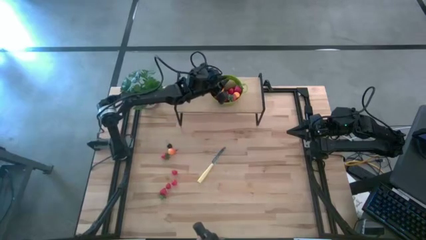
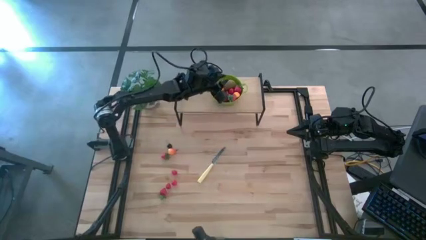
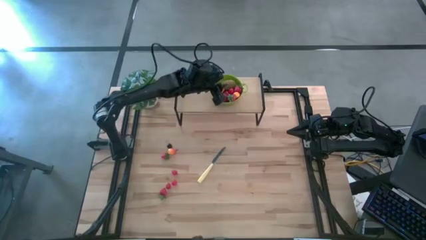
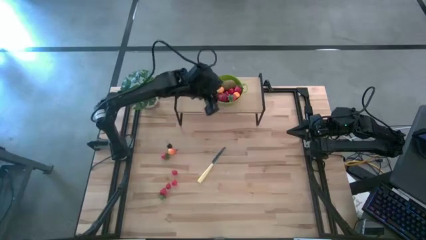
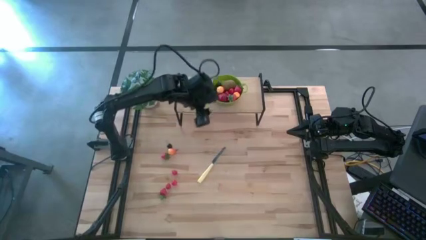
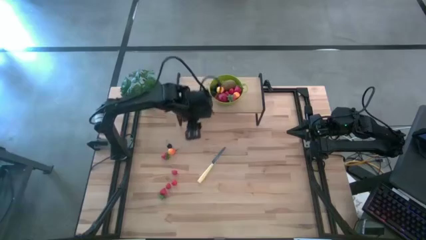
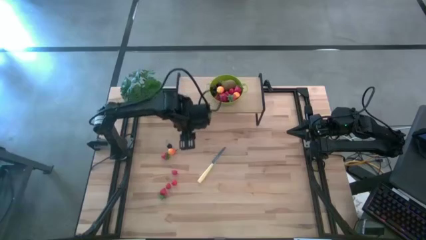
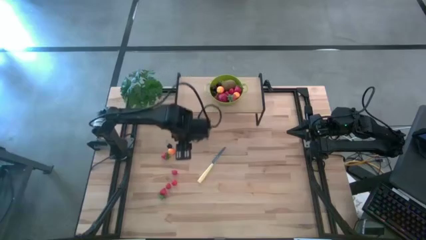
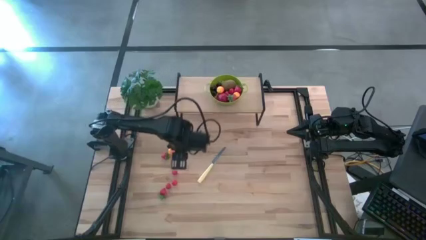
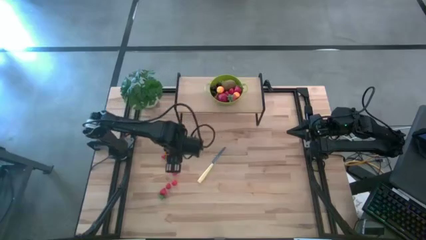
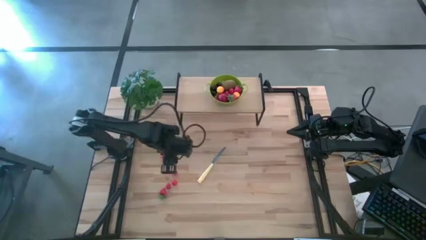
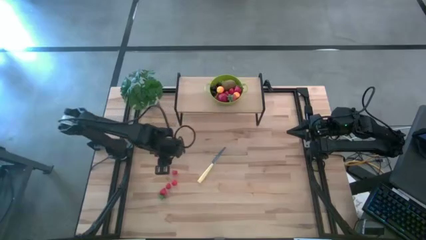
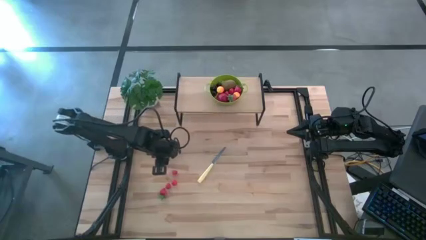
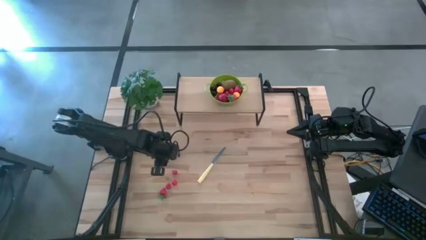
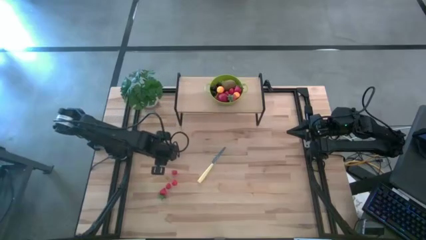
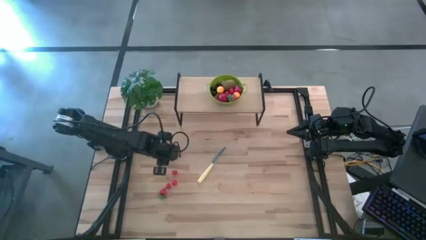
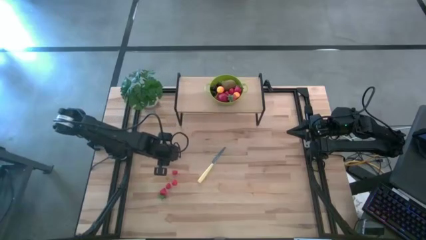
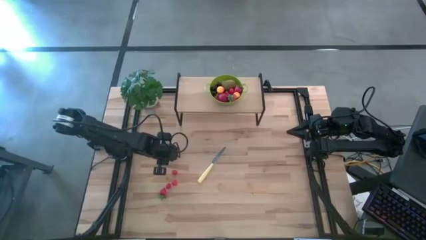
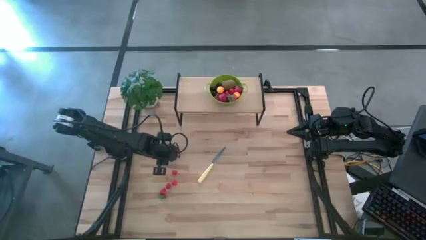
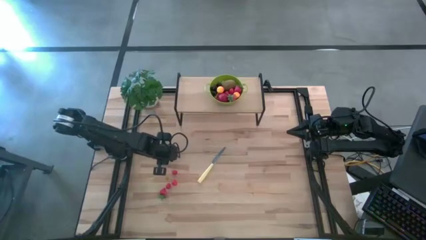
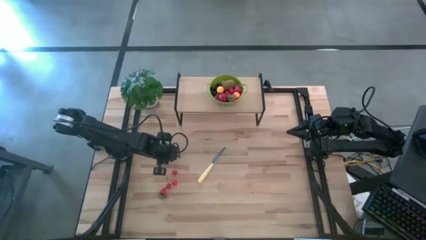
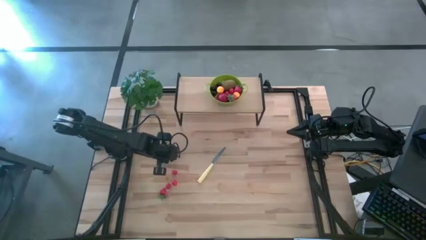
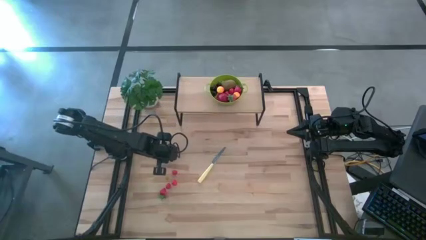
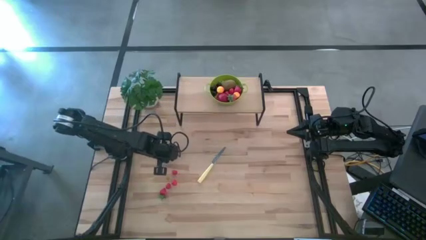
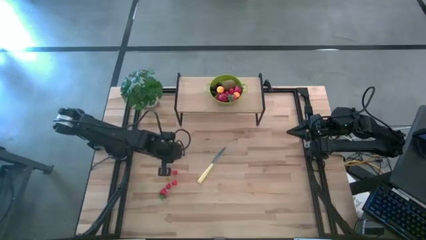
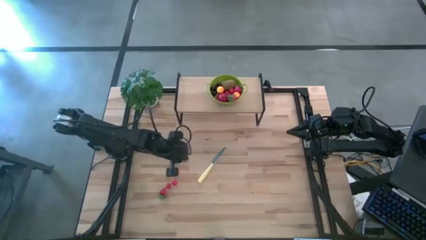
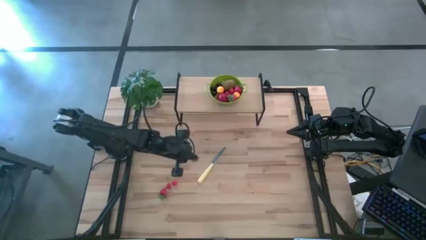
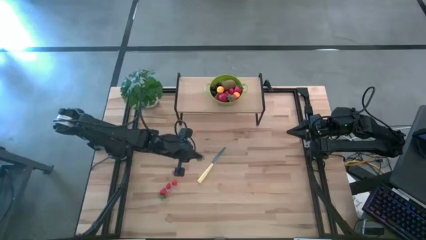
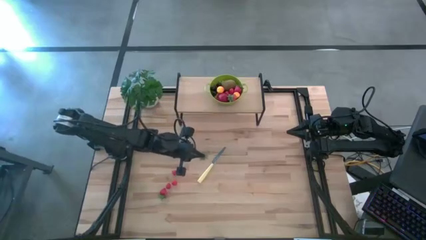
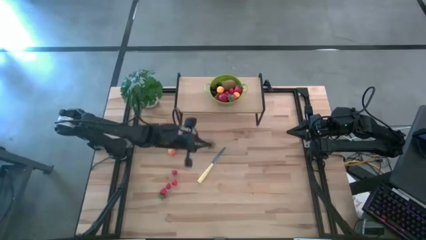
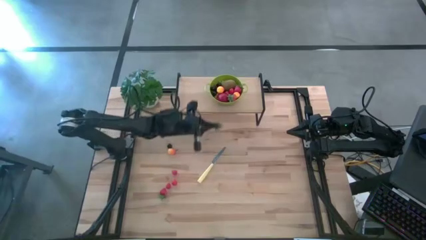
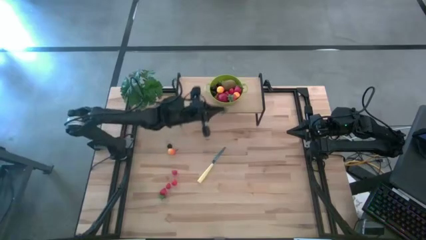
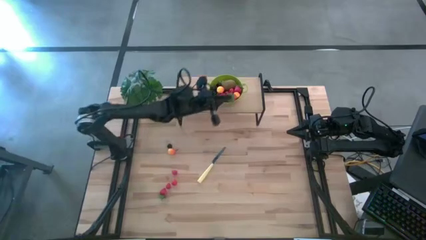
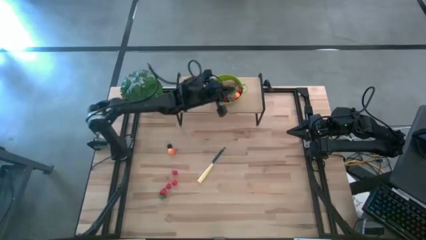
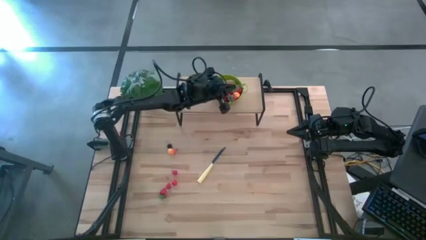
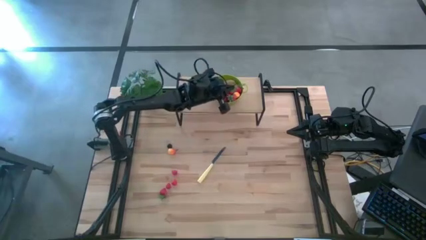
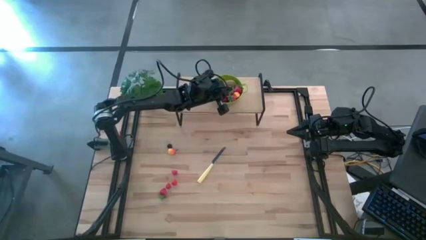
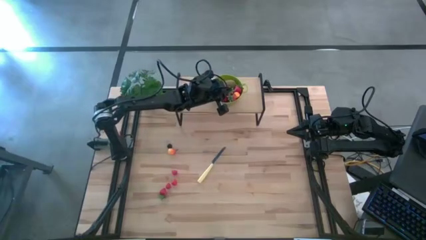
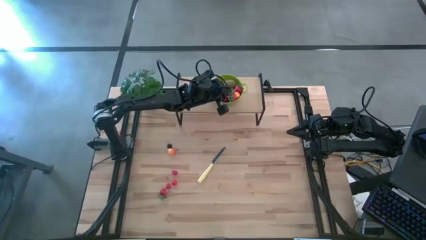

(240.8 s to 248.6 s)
Task: Pick & Place Fruit
Put the strawberry into the strainer bowl

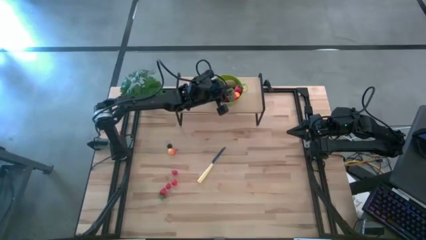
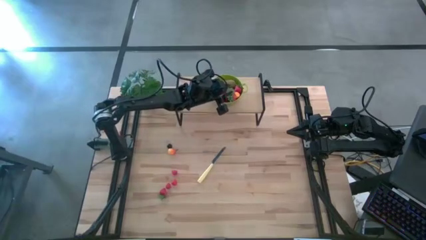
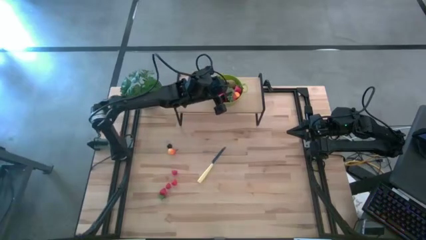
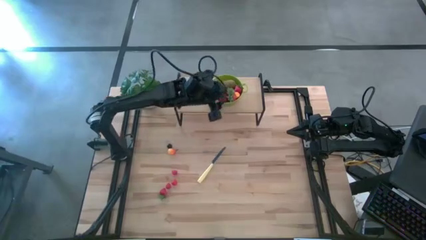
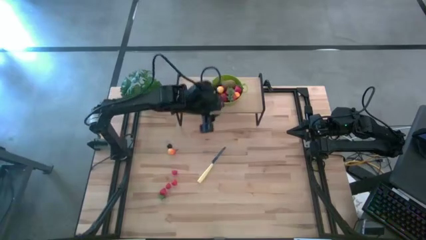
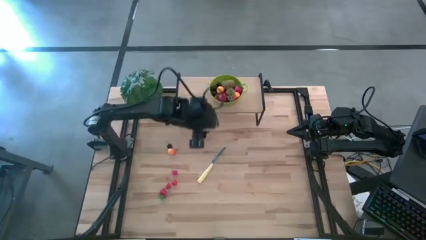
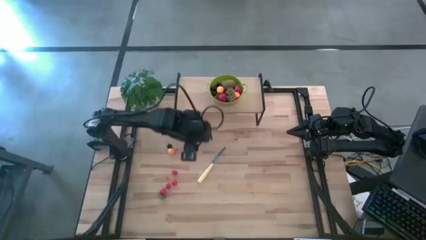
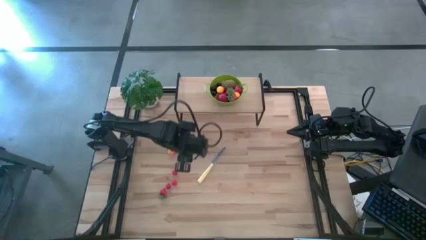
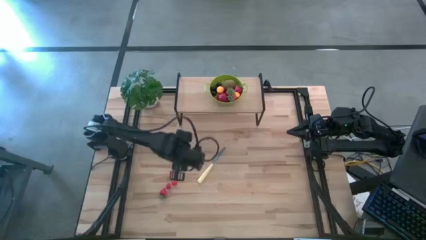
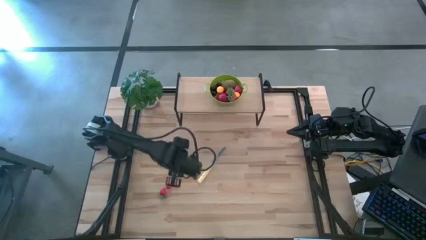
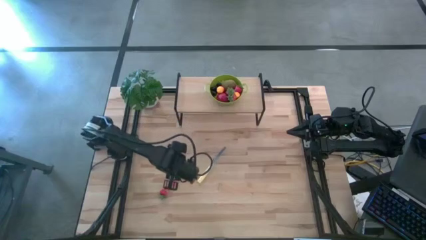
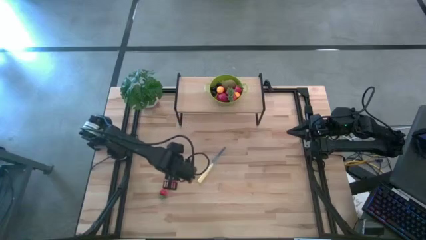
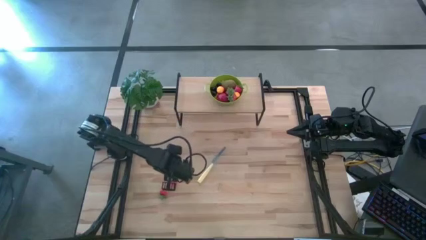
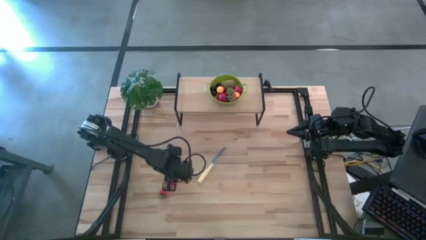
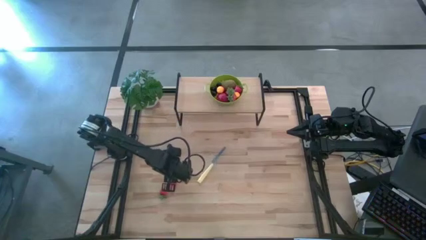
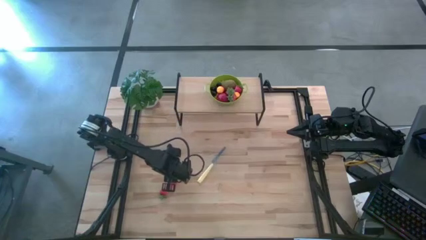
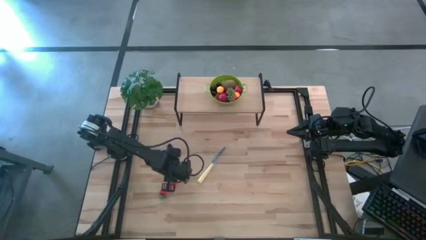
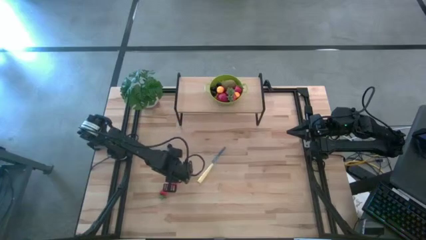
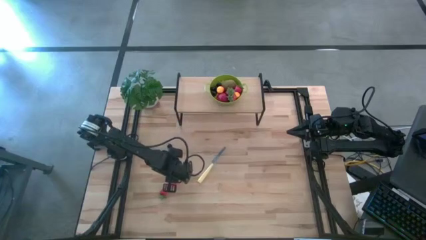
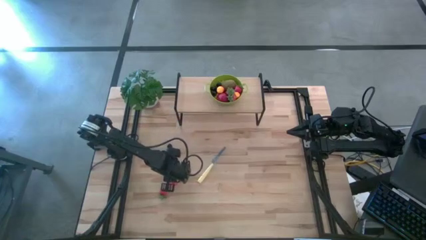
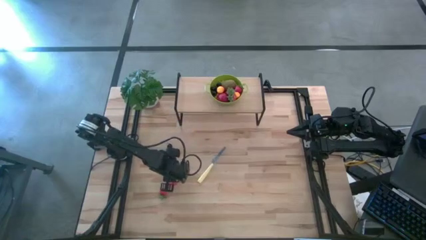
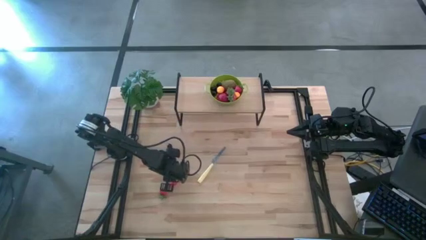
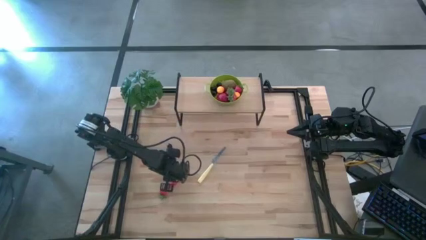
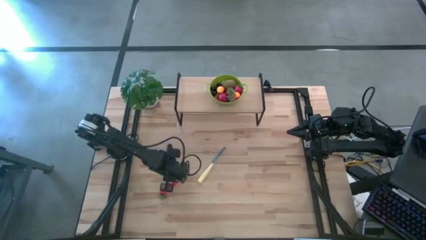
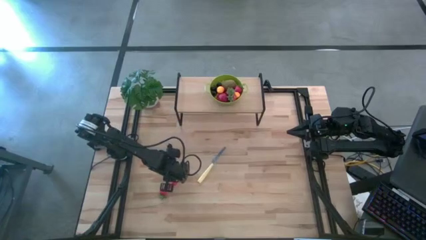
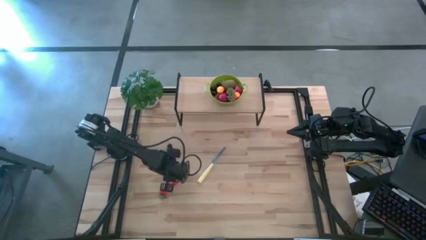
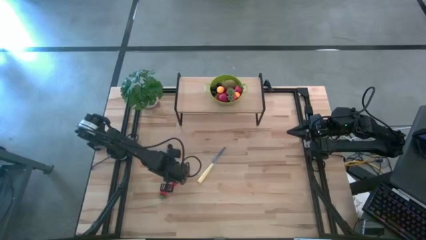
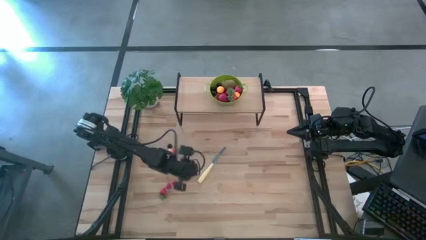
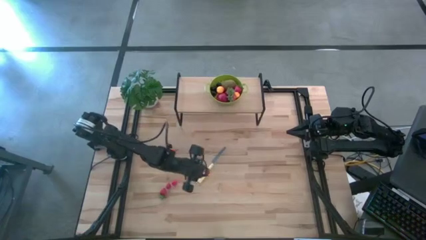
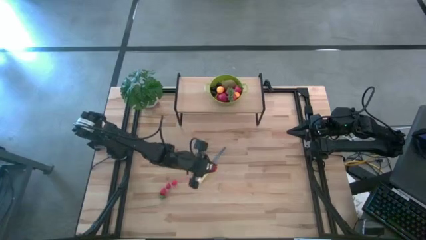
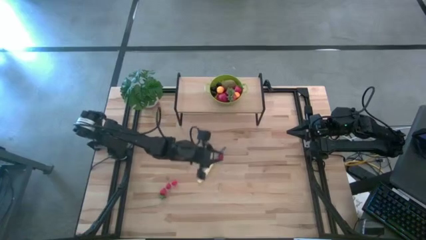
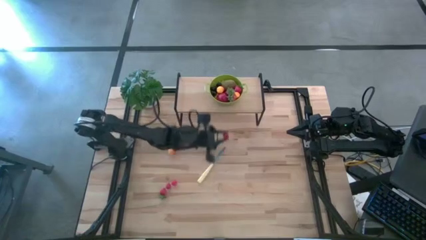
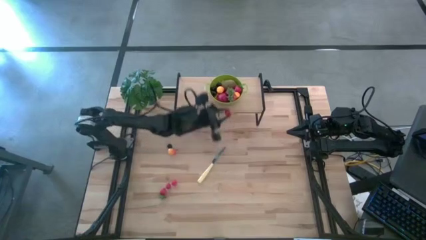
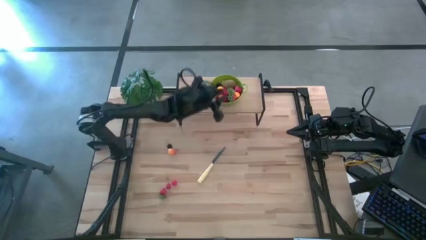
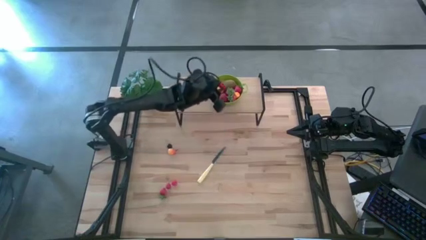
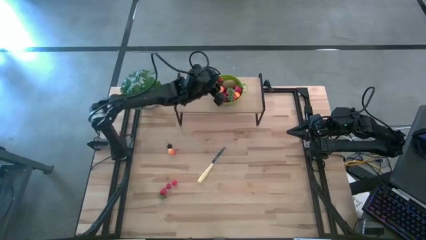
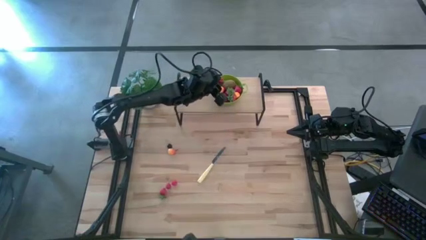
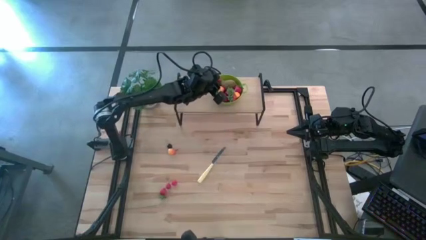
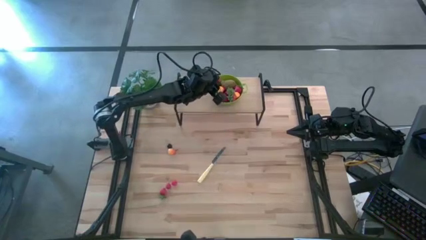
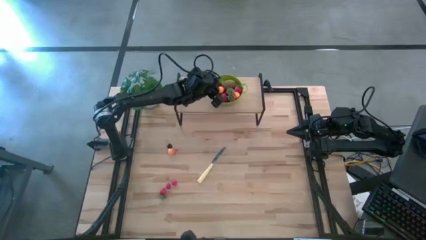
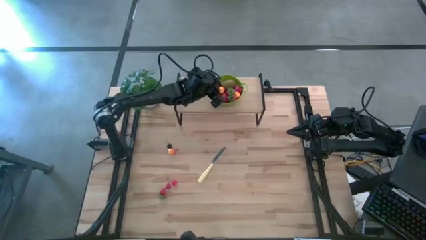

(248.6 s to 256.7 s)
Put the raspberry into the strainer bowl

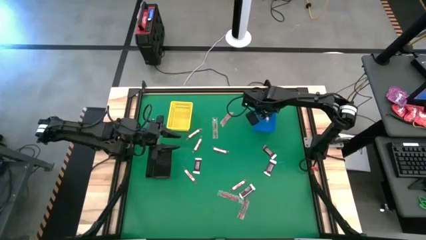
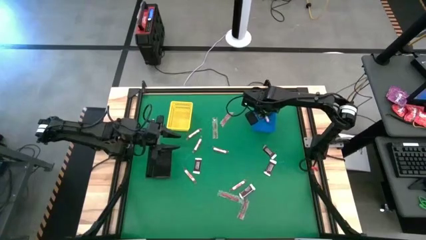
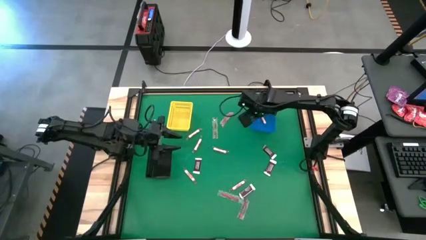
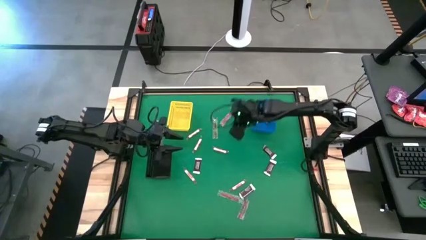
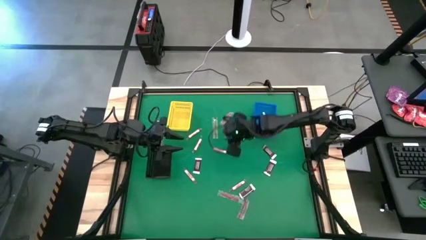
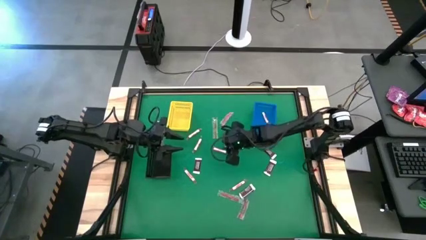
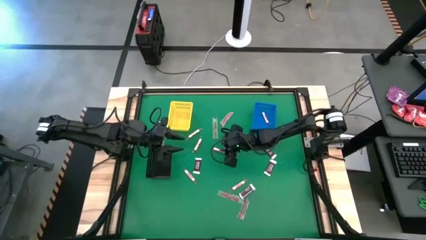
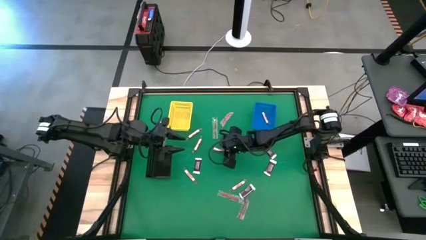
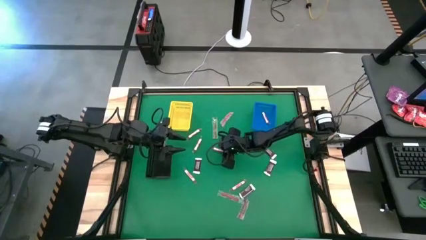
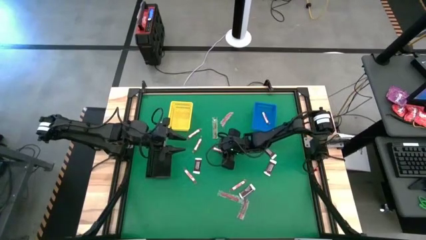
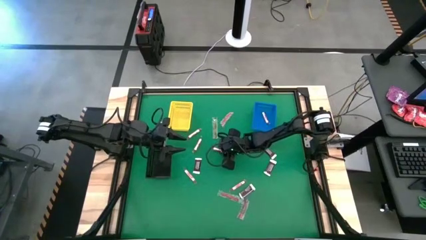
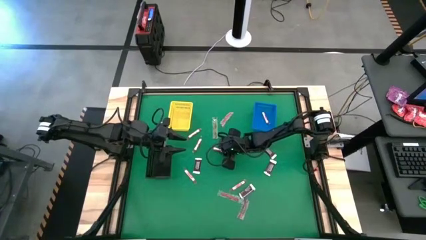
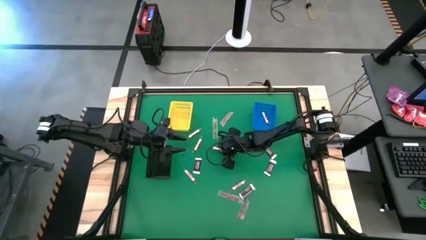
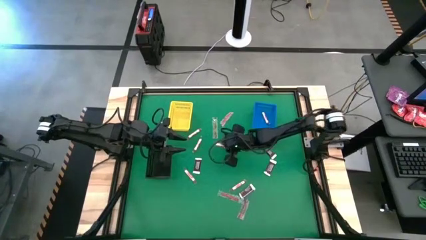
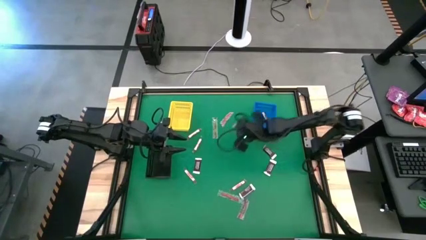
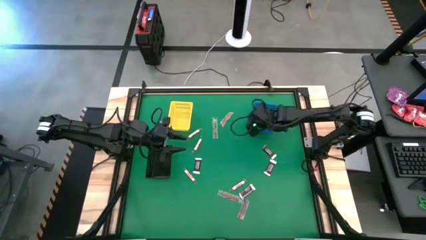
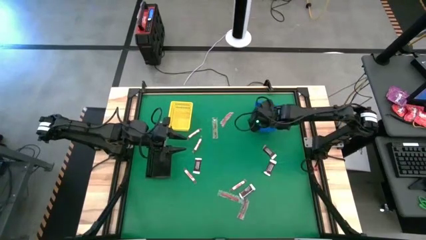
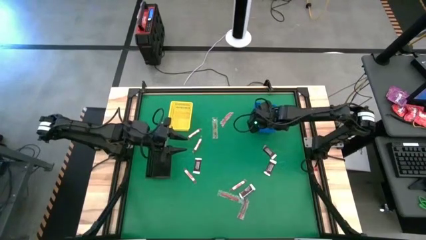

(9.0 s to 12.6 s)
Task: Sort candy by brand, put in halloween buckets
Put the white candy stick into the blue bin
